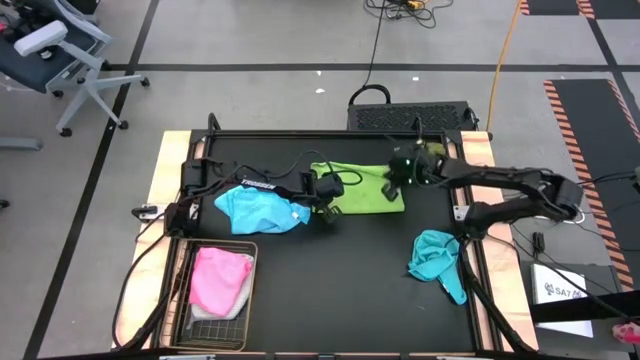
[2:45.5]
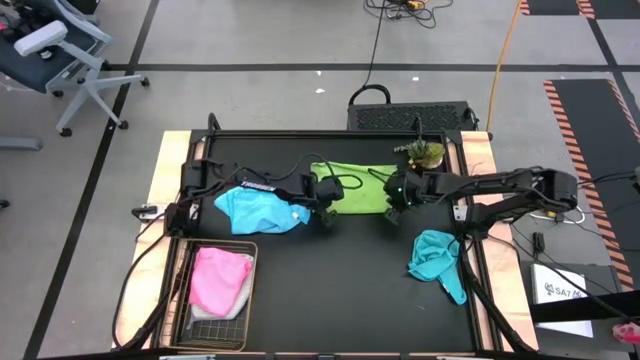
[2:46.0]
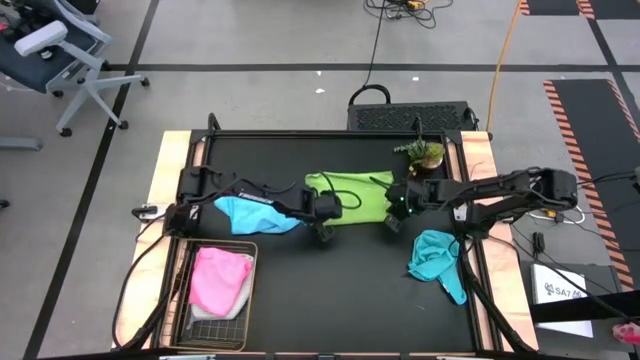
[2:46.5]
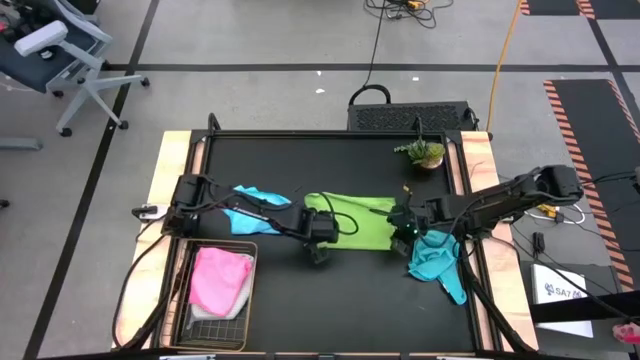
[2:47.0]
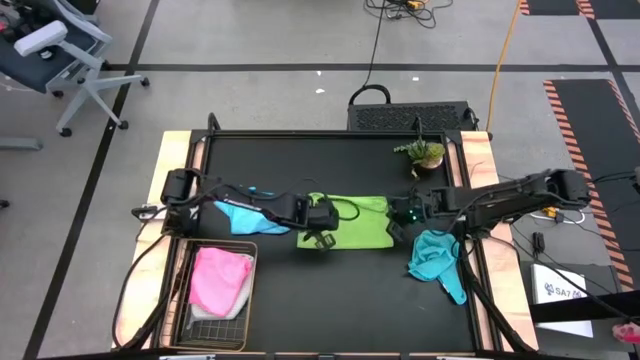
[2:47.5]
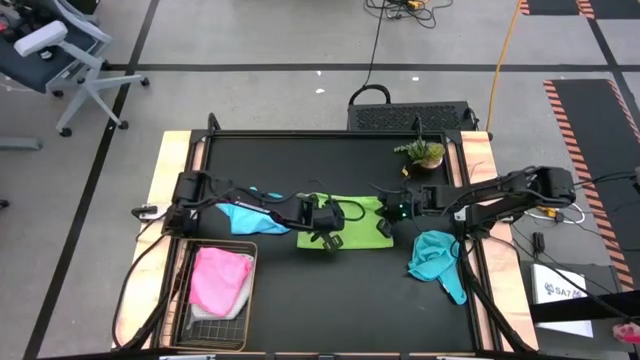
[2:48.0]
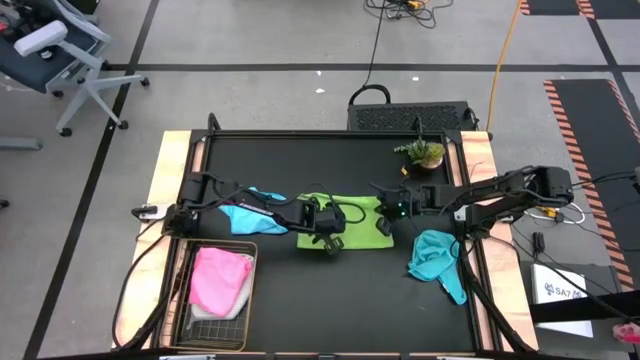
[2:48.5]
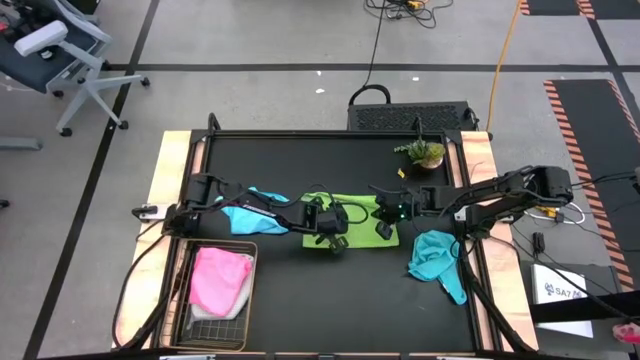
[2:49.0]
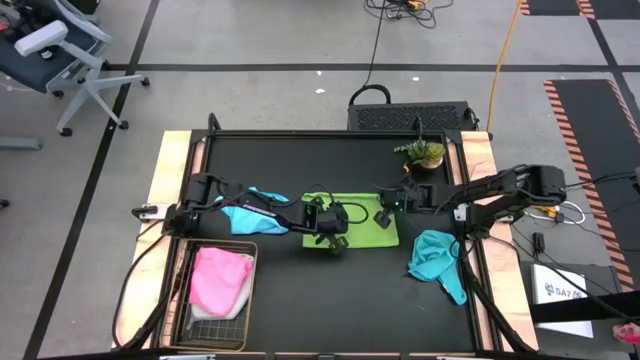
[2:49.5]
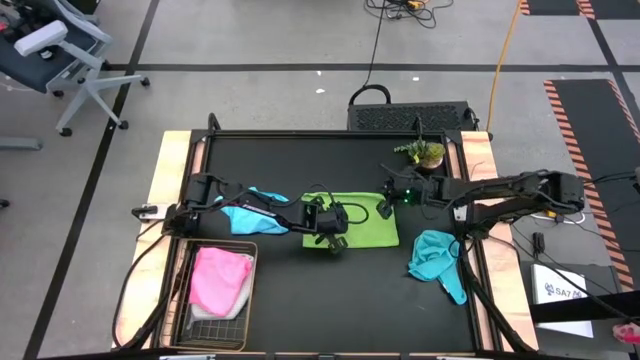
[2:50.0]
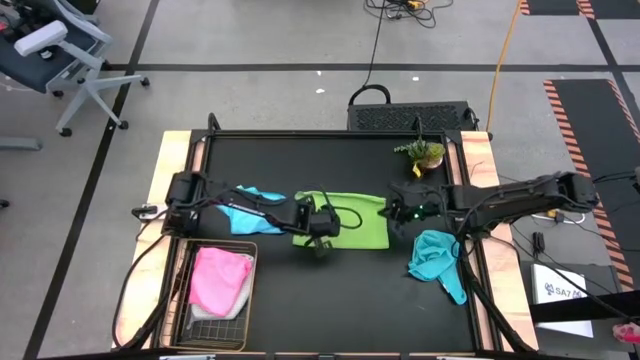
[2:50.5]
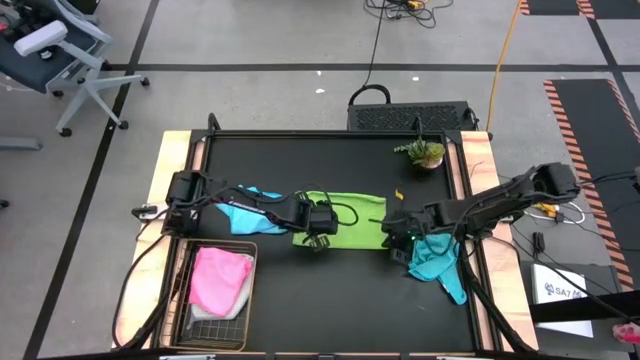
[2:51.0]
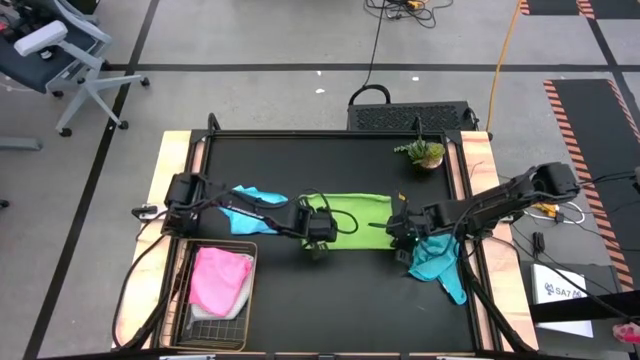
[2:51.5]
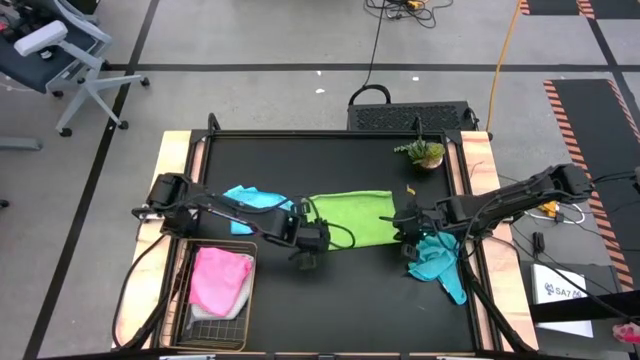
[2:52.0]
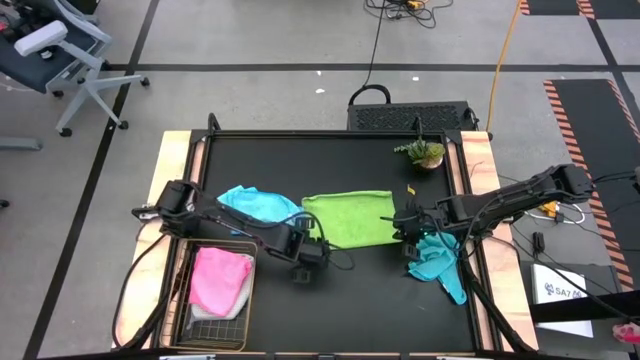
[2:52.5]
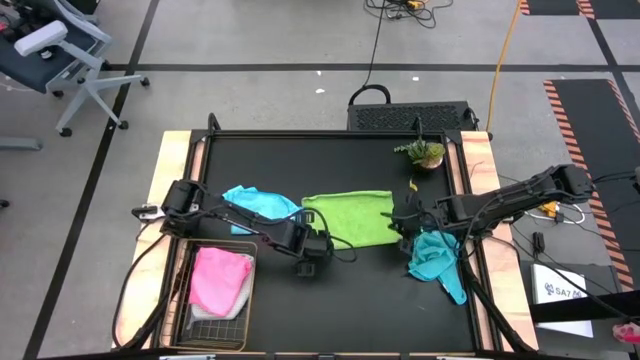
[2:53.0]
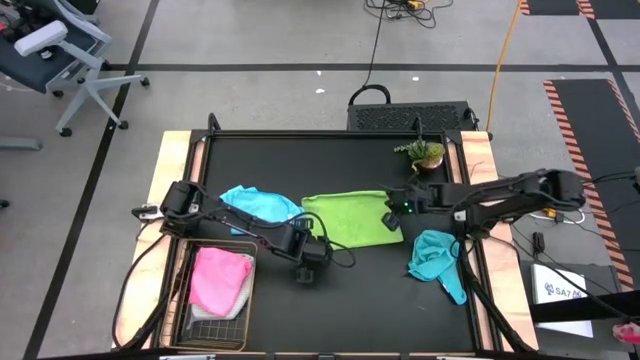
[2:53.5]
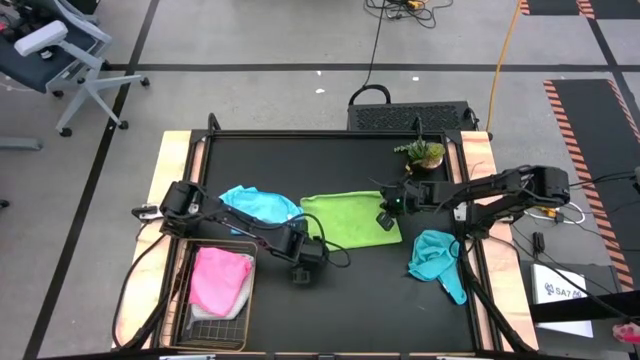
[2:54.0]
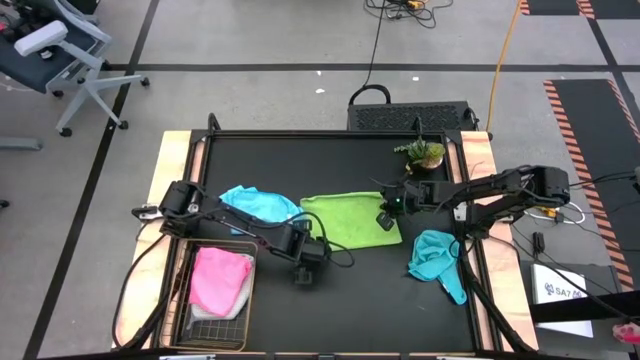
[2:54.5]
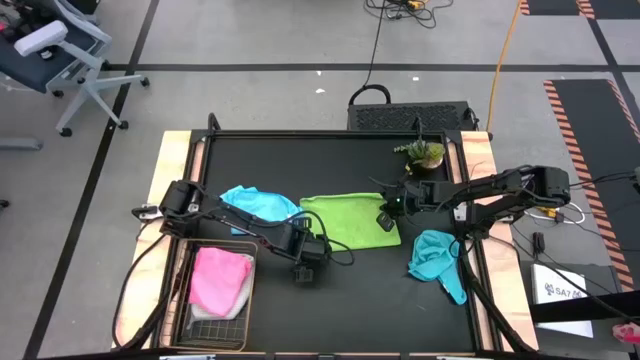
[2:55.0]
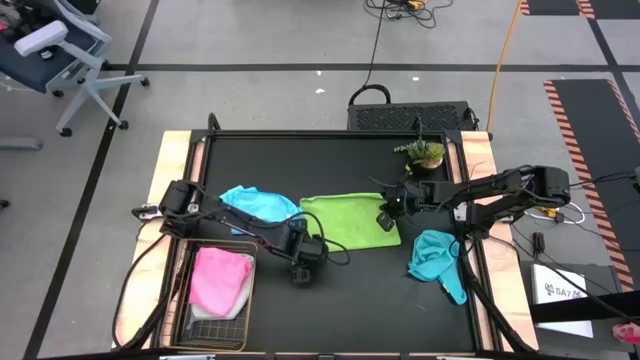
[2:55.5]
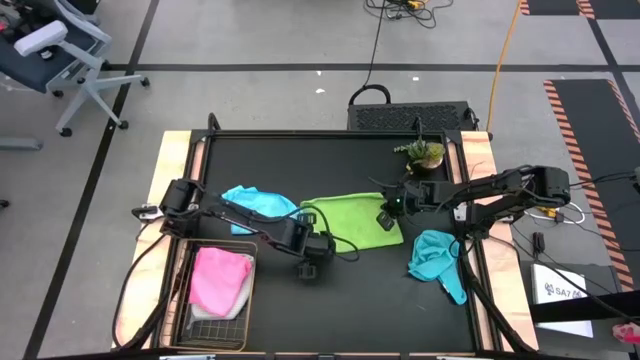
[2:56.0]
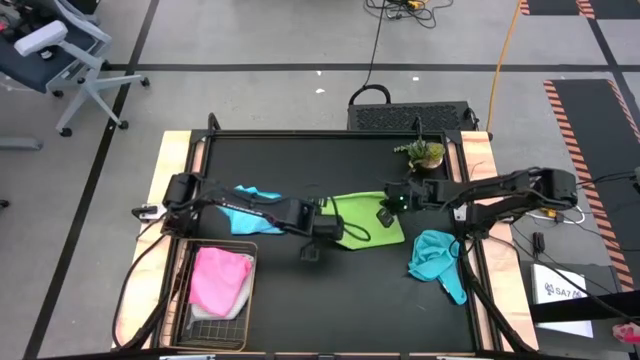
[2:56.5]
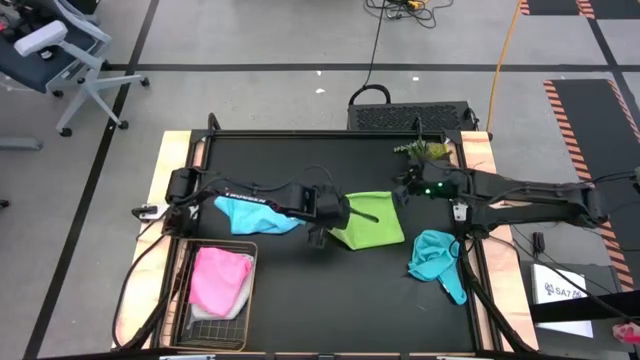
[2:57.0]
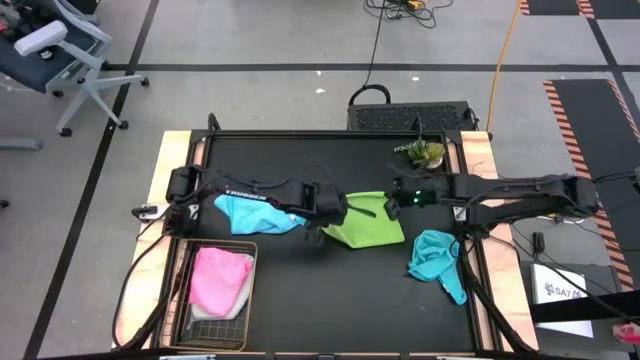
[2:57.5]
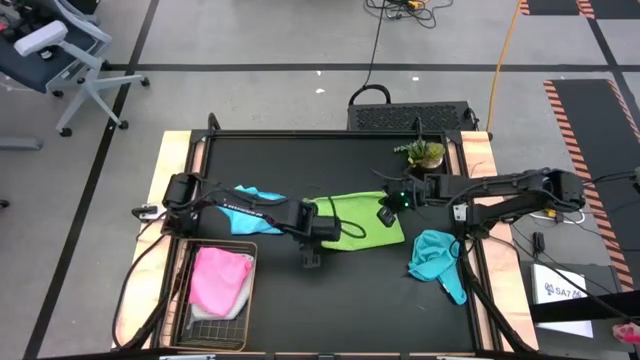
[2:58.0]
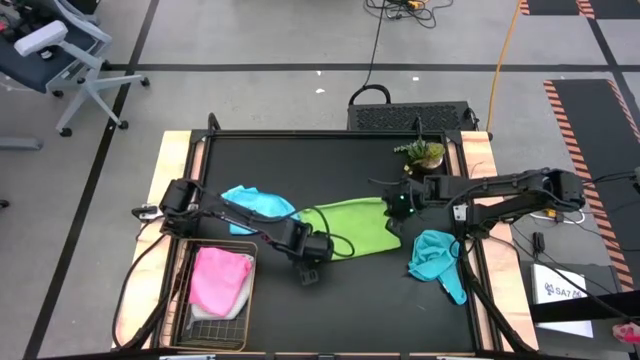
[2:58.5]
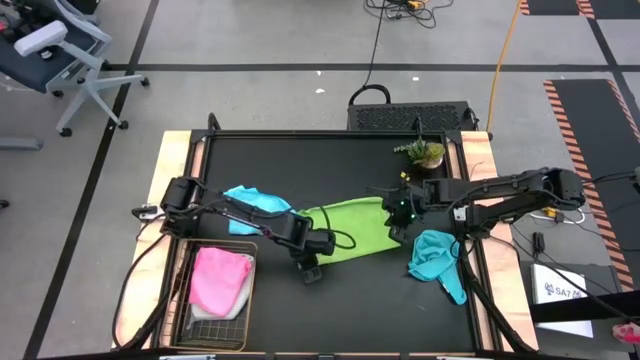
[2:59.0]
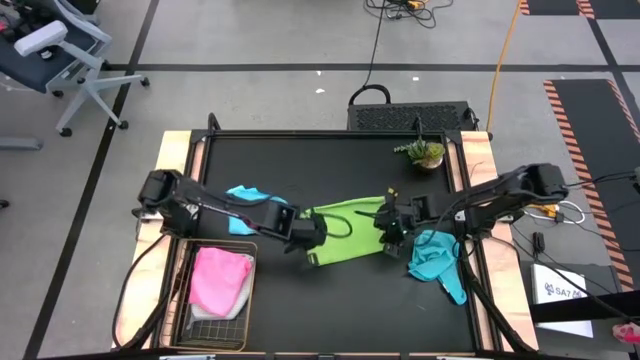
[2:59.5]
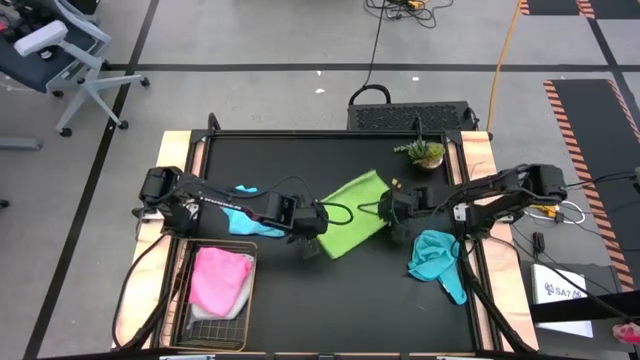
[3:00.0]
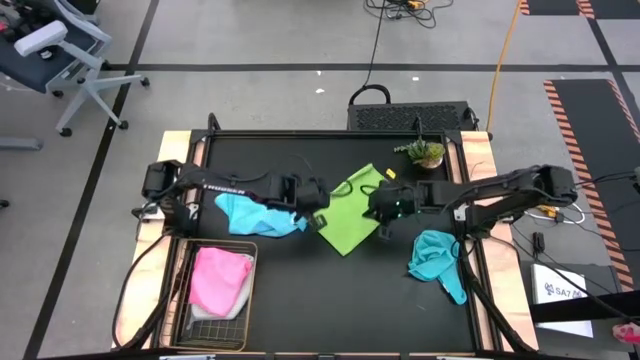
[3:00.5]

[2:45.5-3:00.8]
Task: Fold microfiber towels
Fold the green microfiber cloth

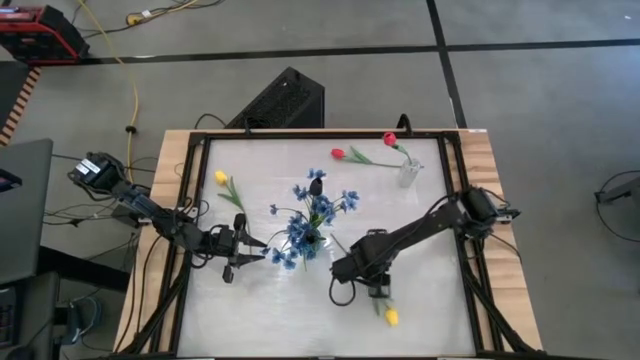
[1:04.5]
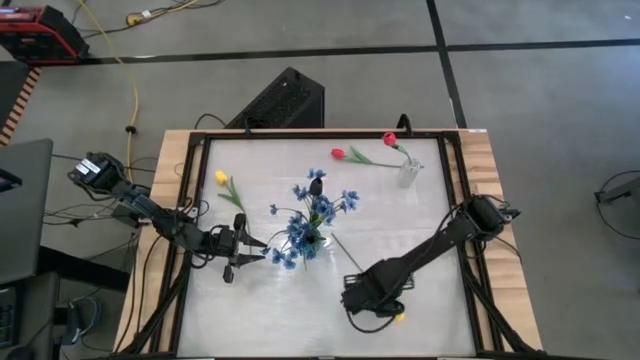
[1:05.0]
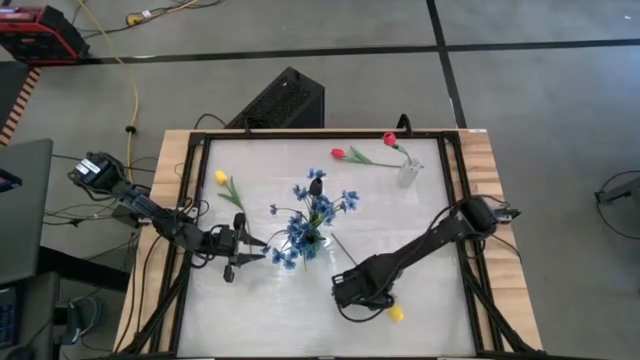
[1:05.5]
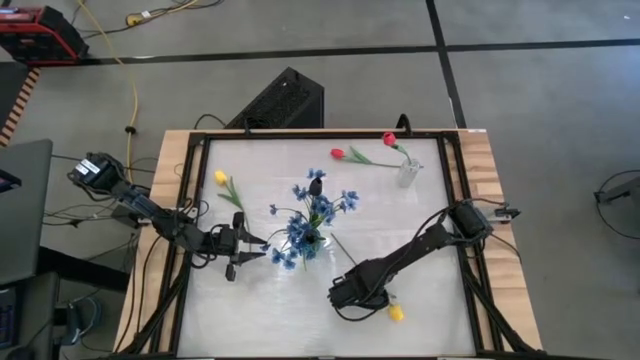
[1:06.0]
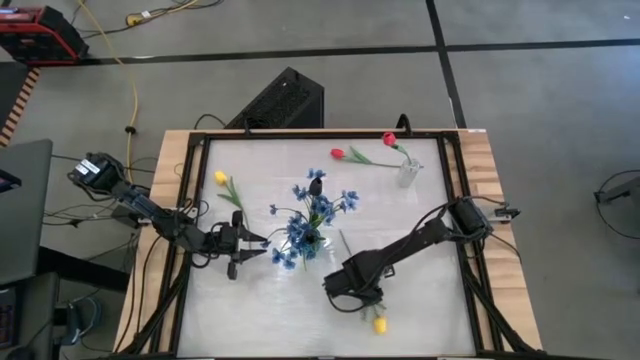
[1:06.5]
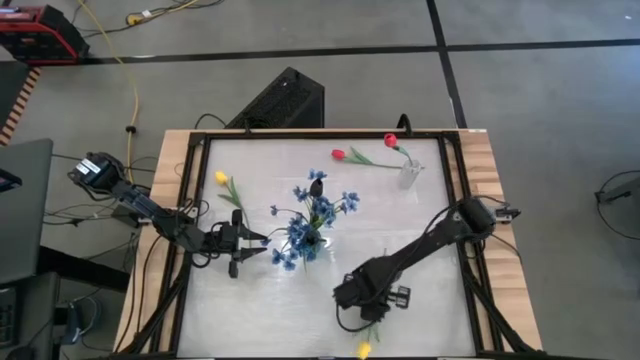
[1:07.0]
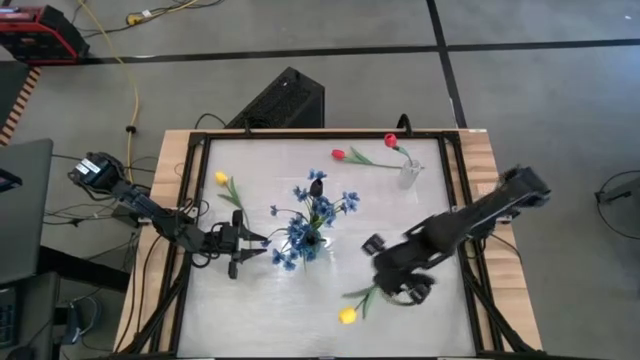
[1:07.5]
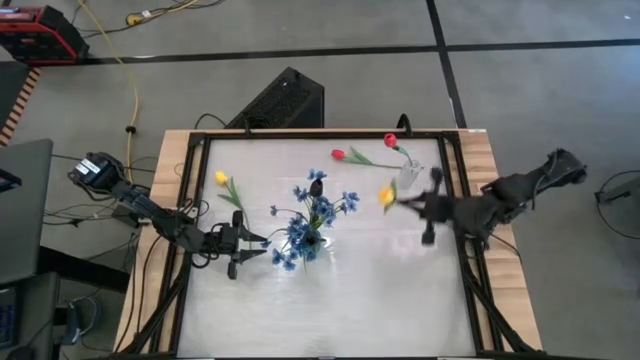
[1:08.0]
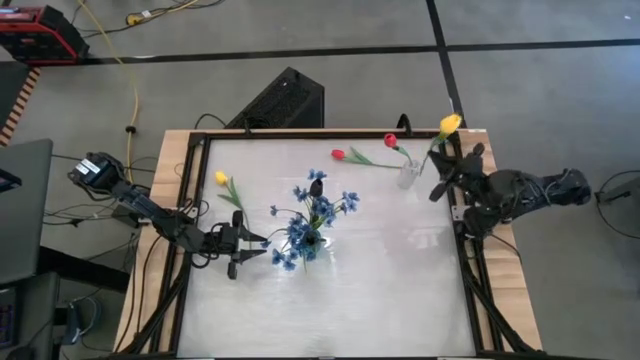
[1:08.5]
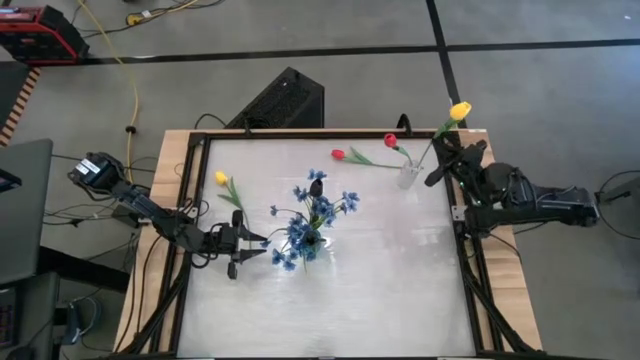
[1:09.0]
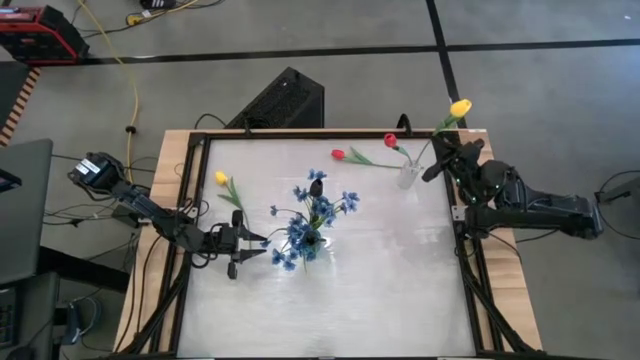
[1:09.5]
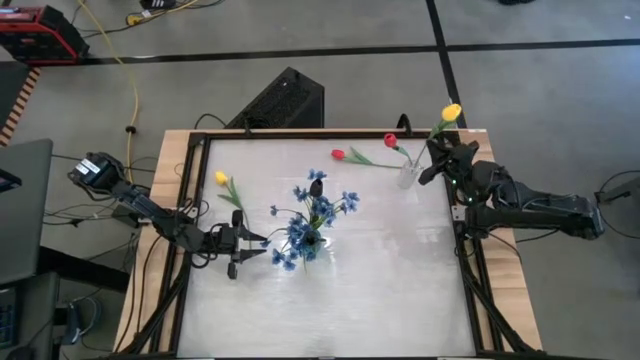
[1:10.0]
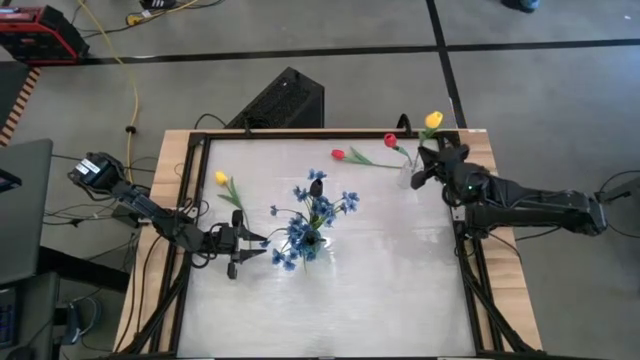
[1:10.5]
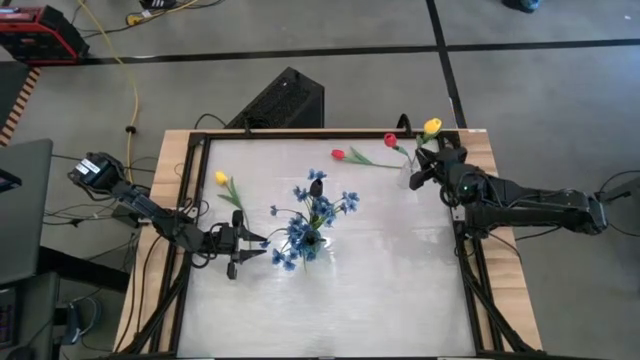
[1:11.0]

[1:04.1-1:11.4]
Task: Sort flowers into vase by color
Put the right yellow tulip into the transparent vase
